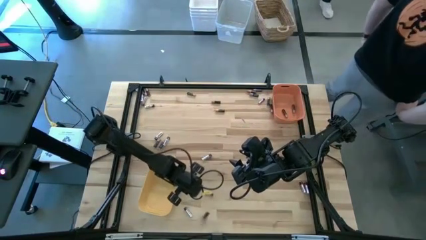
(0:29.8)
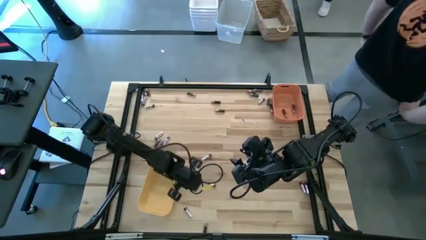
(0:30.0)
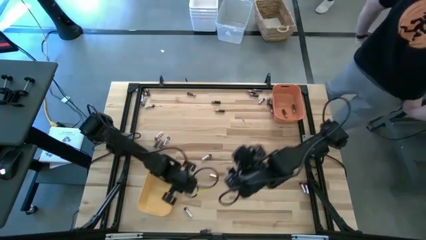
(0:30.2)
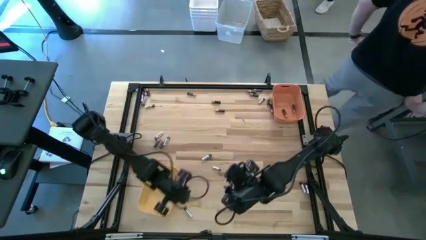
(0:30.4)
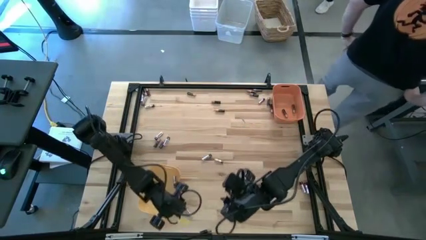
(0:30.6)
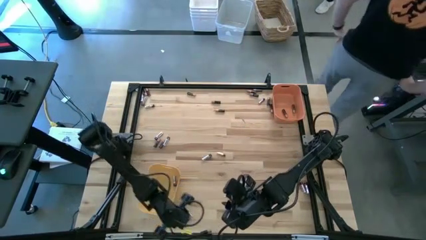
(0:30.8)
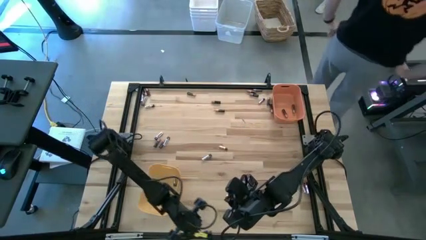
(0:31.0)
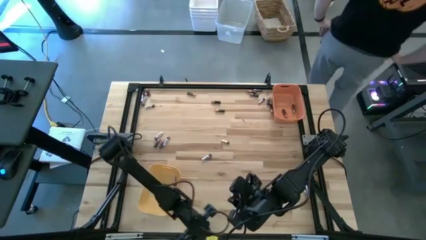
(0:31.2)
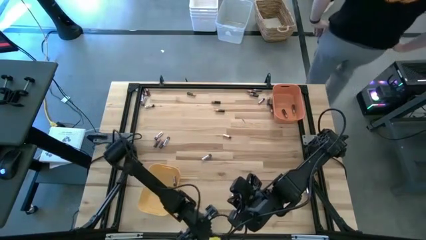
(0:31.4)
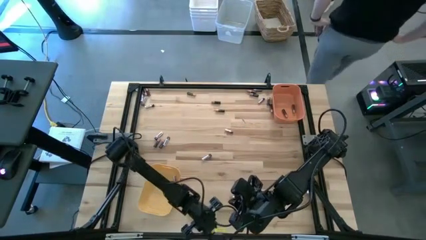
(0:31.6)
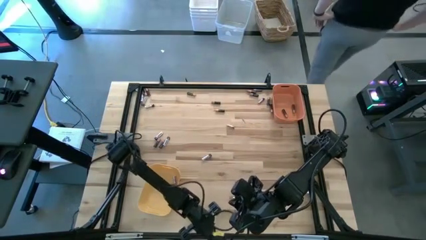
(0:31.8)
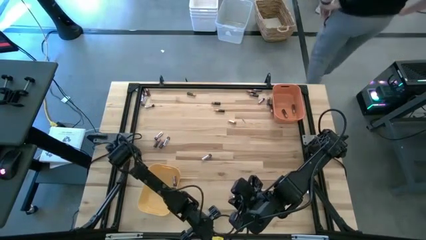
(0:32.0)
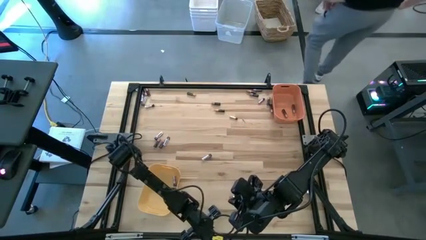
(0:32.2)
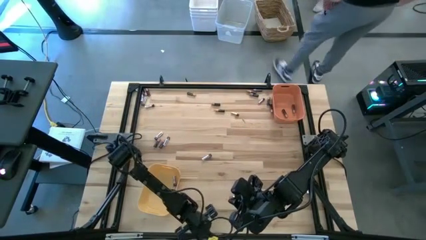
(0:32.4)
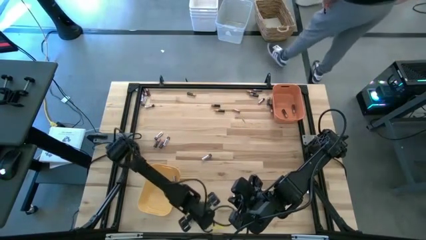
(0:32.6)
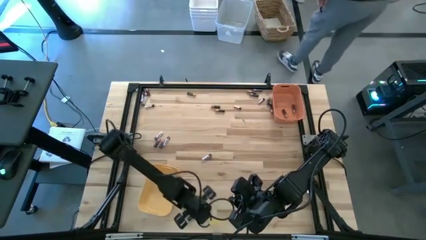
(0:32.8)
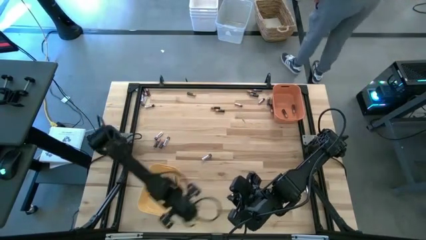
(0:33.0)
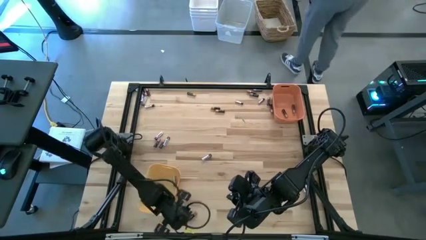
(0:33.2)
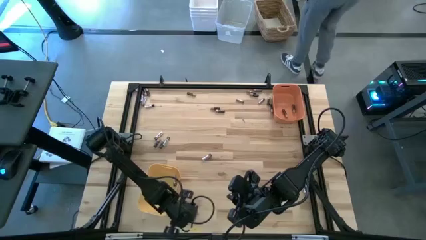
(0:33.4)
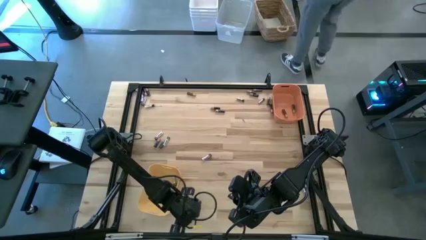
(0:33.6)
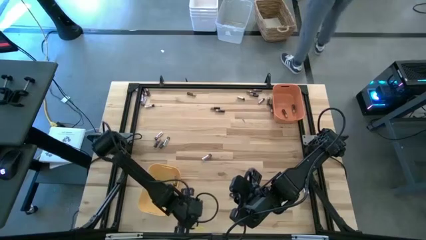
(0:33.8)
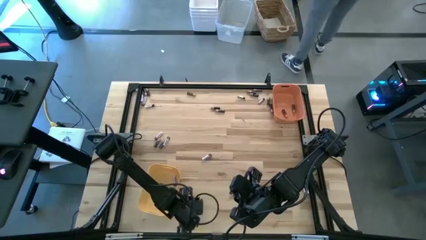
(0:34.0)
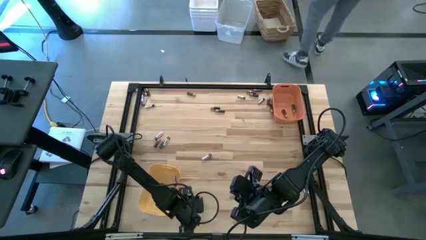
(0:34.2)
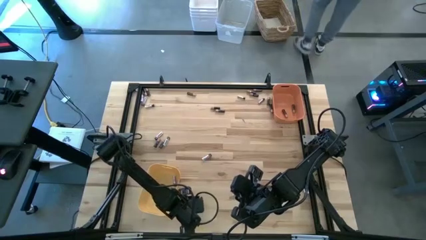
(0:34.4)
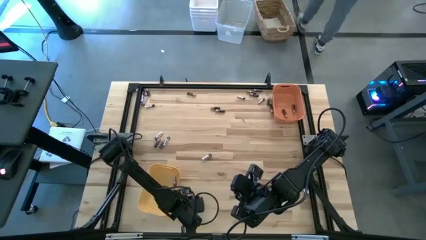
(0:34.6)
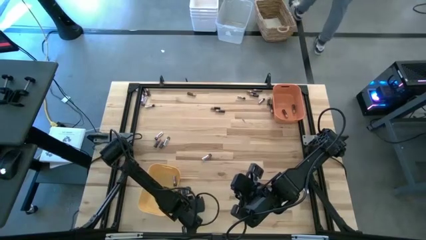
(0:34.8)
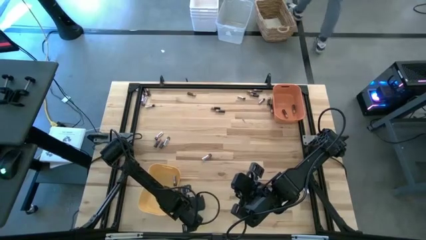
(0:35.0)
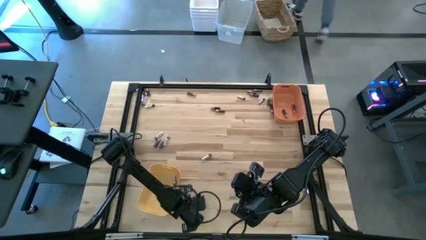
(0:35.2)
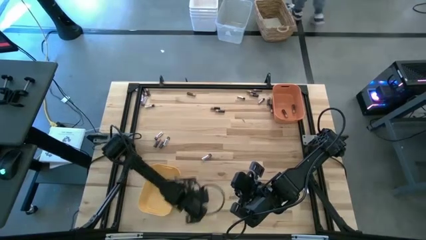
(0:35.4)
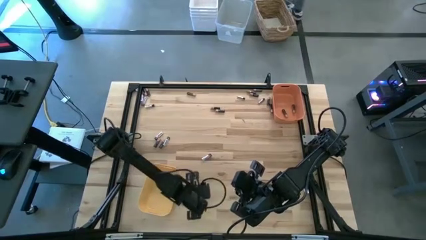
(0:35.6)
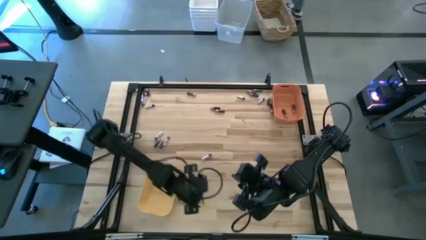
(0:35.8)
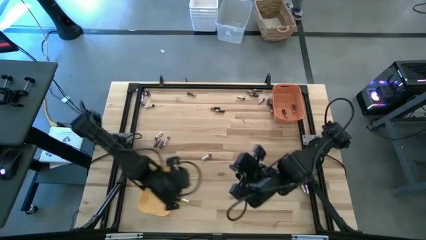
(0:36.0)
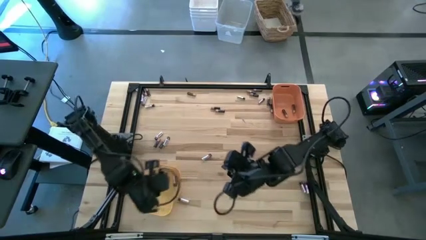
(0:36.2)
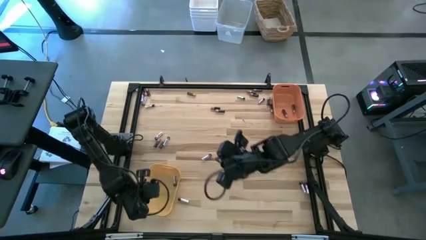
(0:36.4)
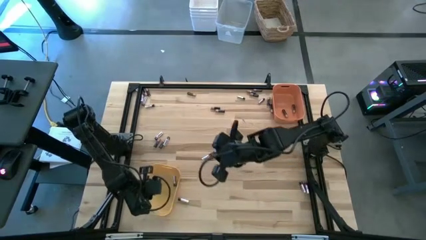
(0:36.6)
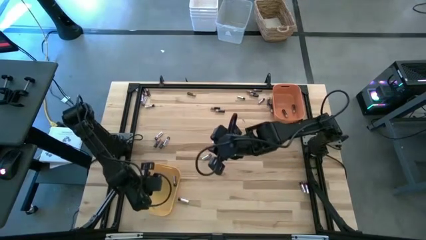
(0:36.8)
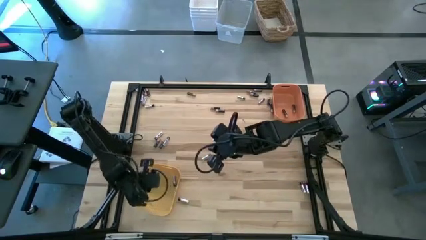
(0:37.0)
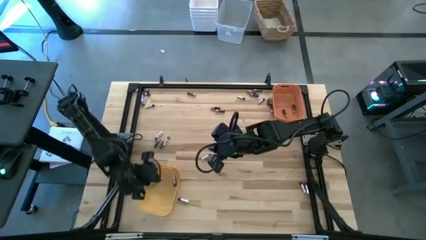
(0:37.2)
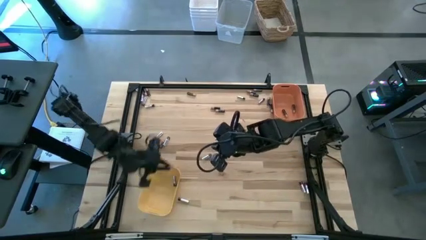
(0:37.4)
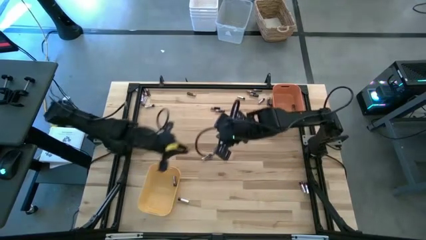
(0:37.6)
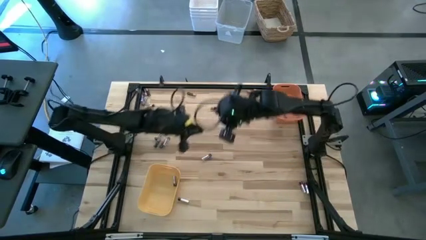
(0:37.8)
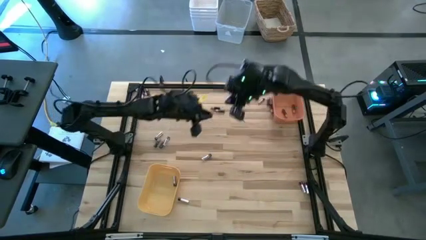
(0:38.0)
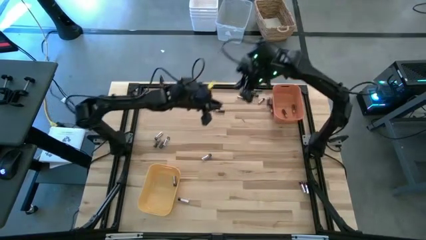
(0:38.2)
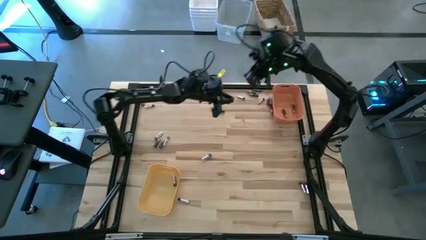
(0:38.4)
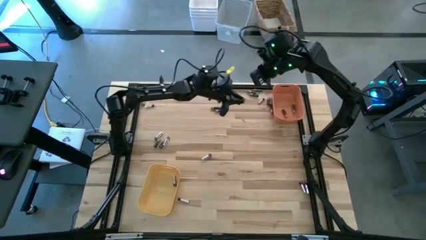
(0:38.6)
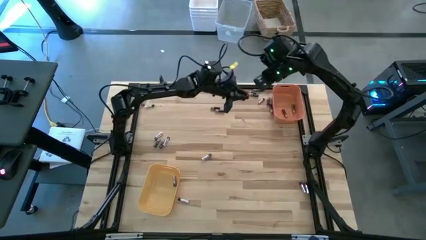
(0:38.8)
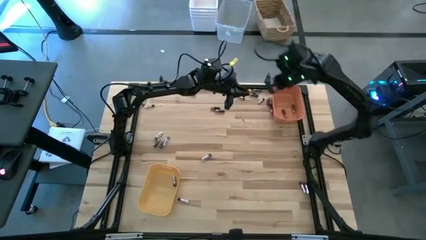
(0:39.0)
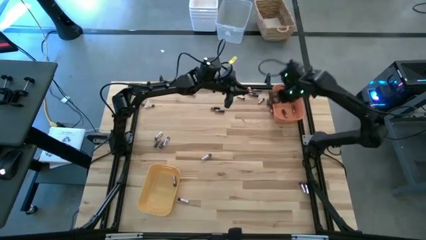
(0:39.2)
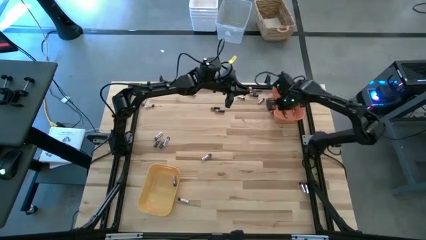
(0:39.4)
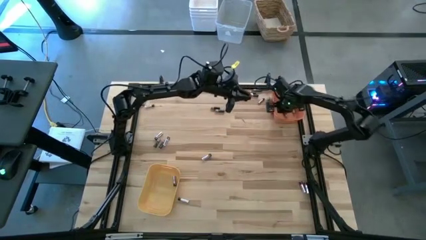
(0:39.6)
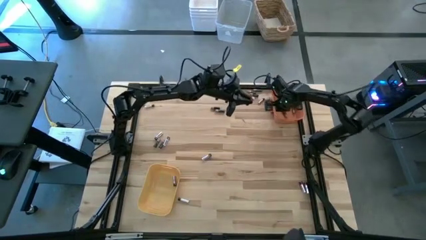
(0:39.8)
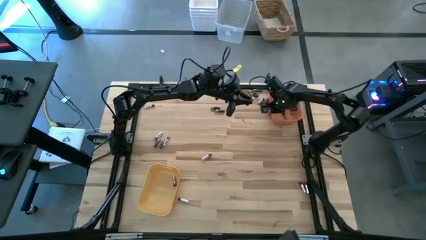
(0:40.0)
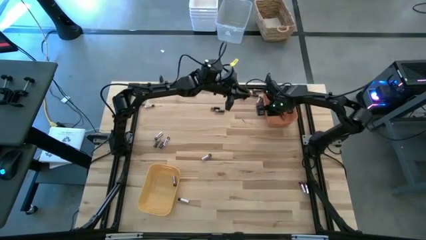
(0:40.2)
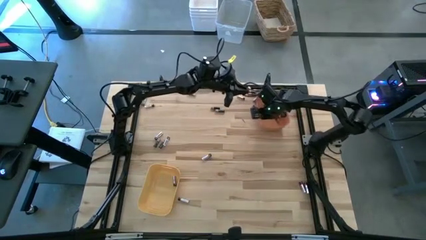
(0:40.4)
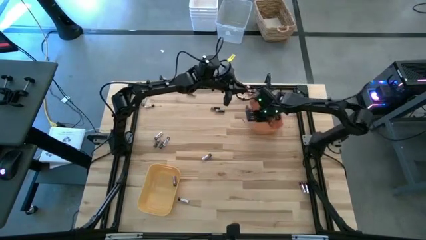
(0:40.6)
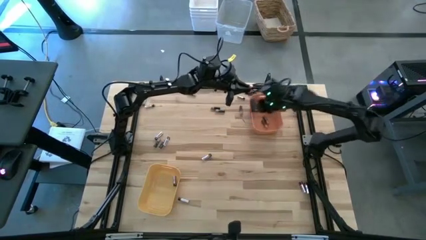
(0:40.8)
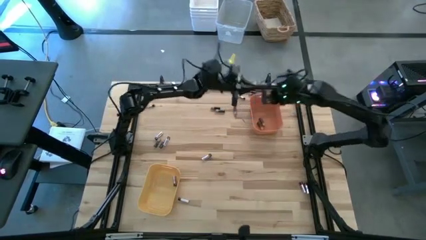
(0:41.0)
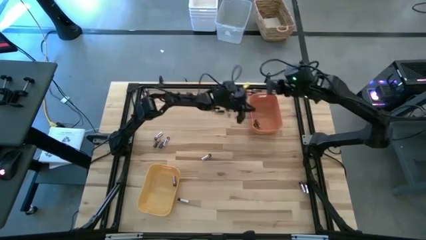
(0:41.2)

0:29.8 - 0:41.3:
Task: Sort batteries
Put the black battery into the orange bin

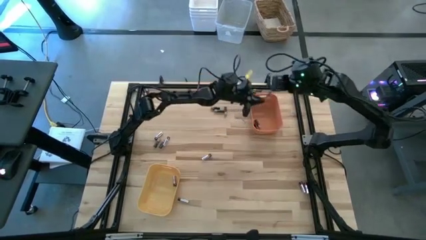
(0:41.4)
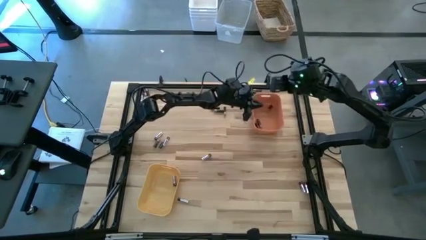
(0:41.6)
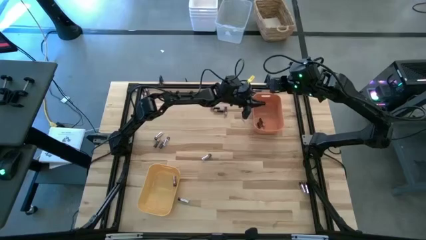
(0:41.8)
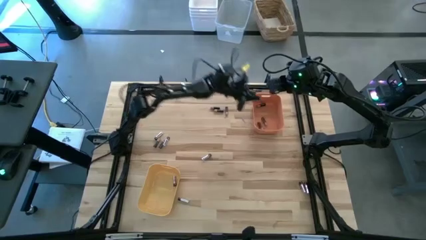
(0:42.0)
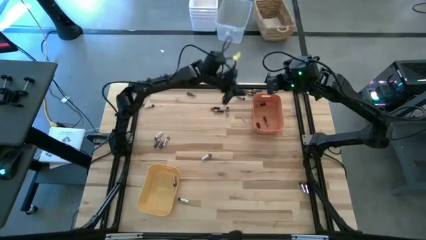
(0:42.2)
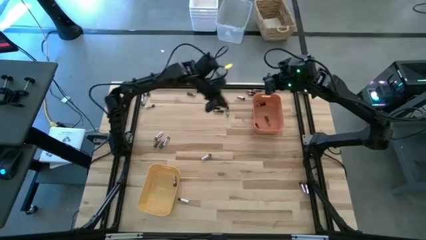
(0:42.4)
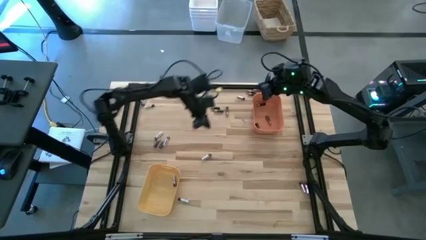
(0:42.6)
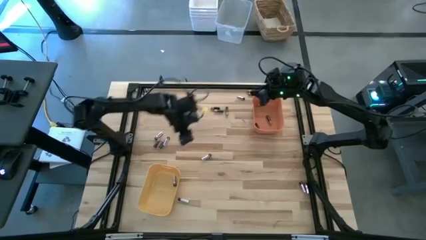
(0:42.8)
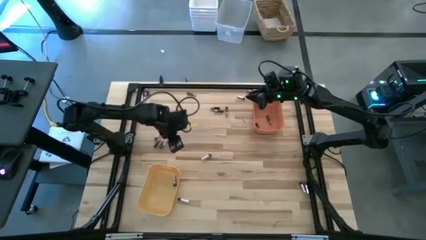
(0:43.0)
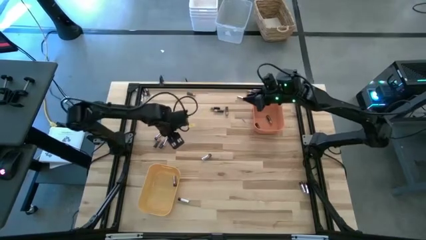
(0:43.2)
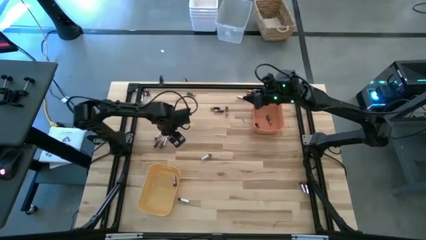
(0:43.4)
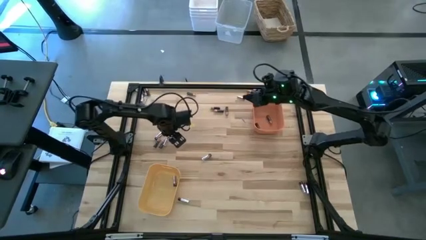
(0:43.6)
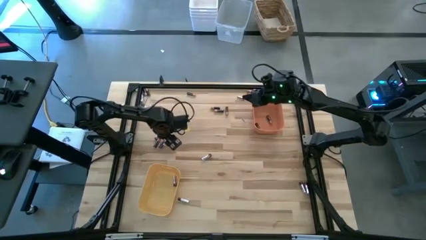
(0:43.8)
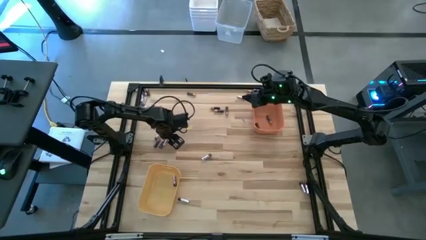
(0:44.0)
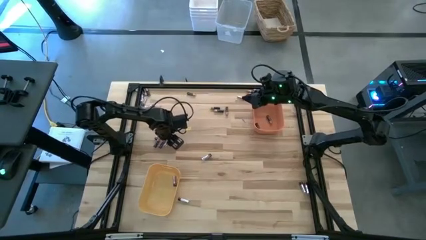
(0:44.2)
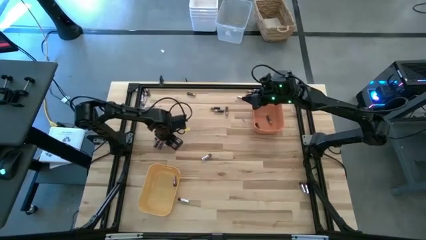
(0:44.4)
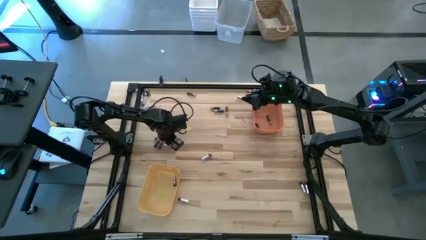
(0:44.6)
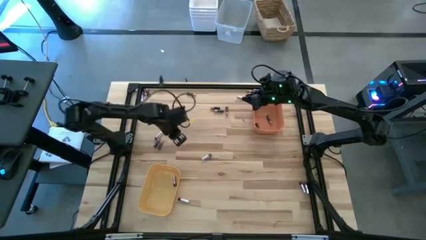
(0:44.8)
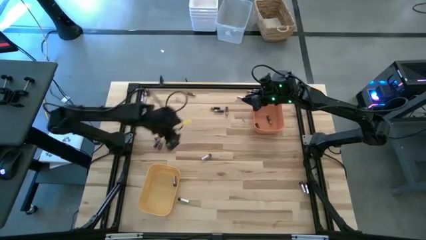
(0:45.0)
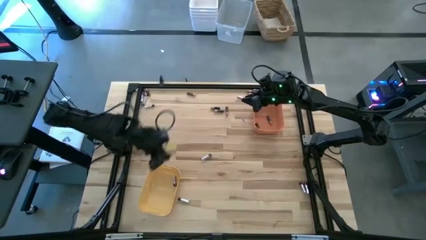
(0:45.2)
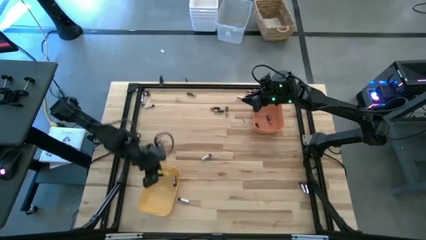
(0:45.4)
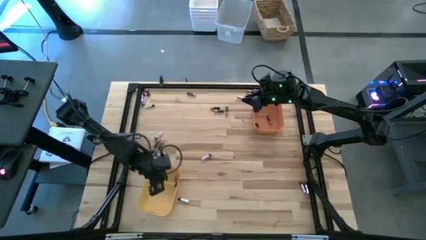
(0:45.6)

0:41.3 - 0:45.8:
Put the silver battery into the yellow bin

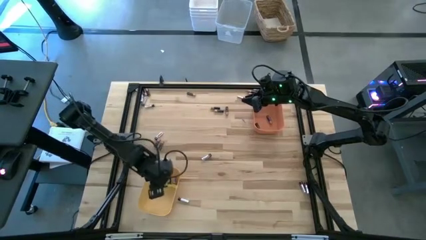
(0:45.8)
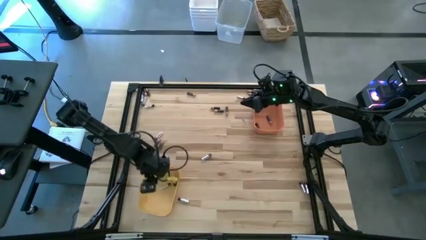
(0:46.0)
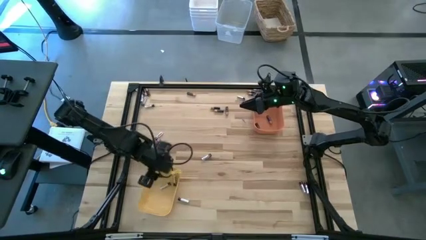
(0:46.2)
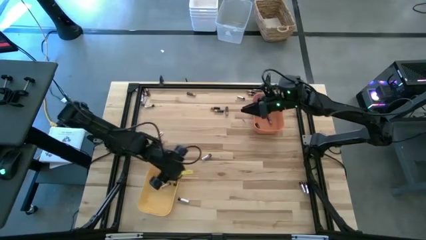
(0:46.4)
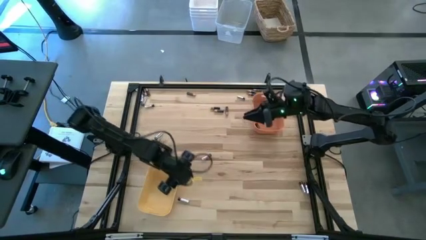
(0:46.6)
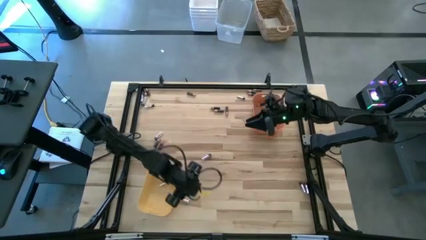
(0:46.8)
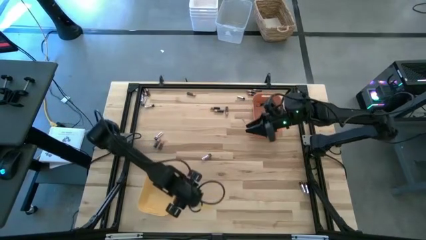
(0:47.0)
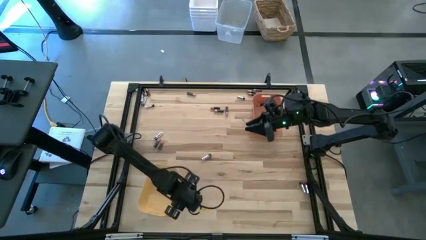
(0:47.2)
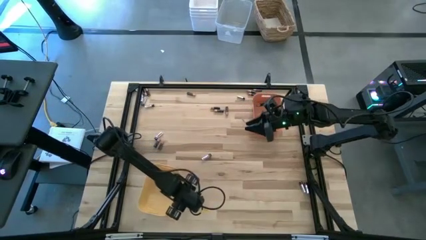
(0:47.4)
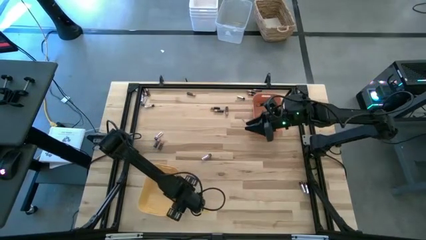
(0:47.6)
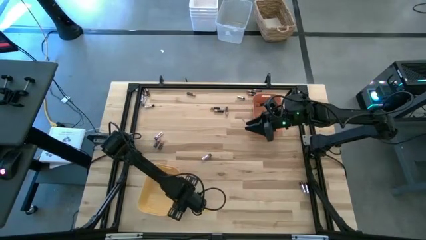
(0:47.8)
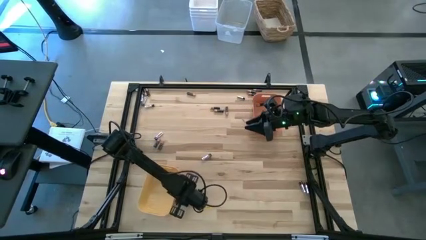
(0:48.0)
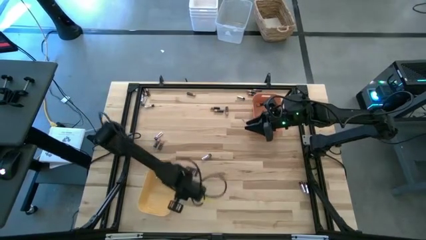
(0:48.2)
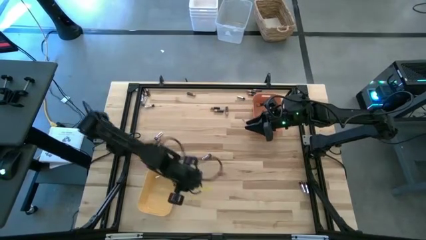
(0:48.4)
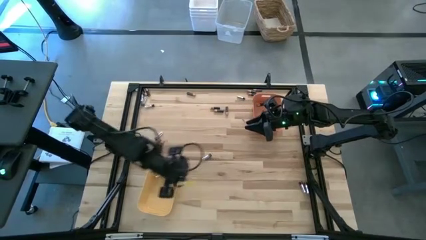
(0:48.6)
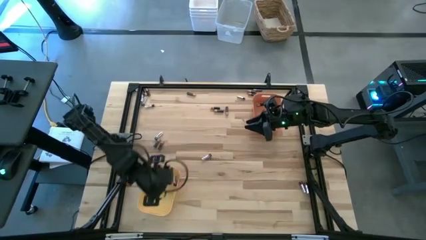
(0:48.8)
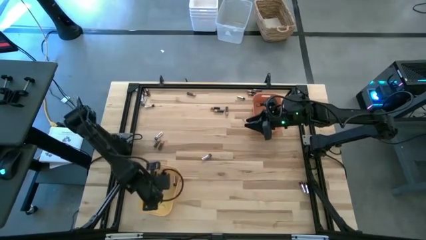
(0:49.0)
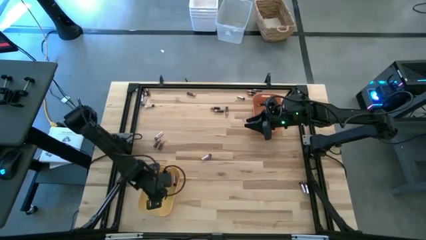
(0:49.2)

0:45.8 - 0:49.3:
Put the silver battery into the yellow bin
